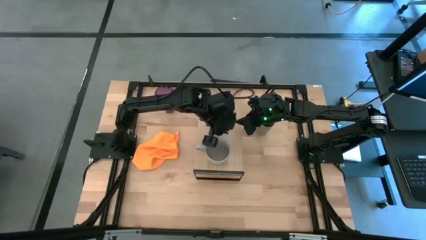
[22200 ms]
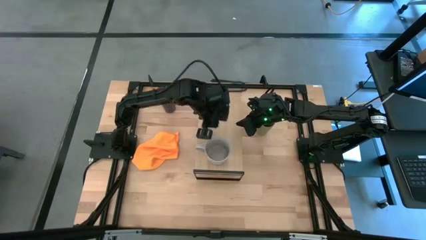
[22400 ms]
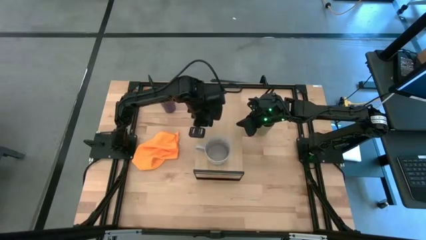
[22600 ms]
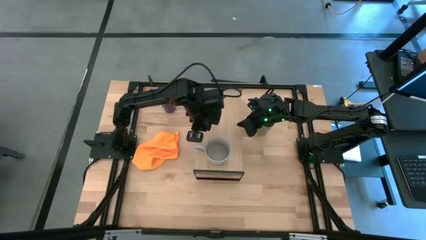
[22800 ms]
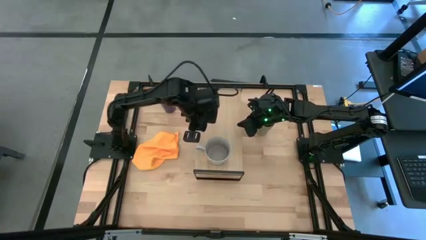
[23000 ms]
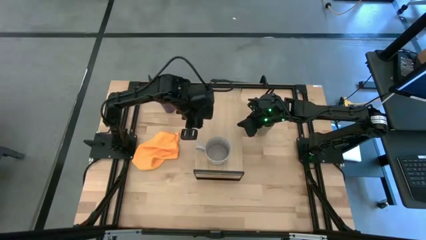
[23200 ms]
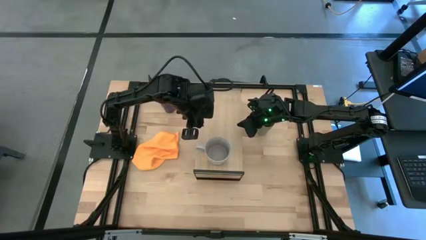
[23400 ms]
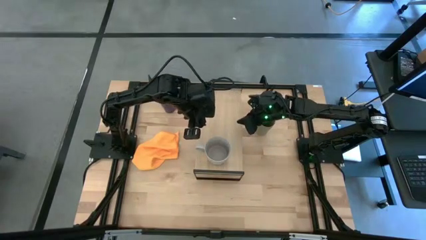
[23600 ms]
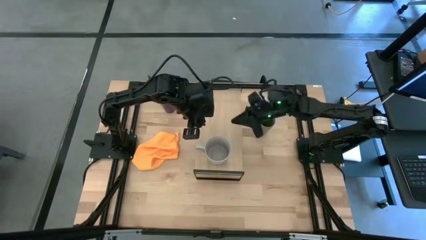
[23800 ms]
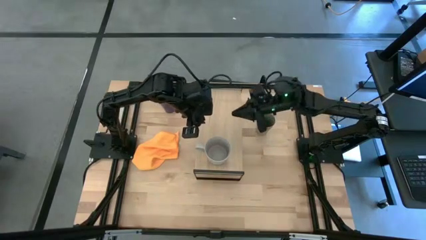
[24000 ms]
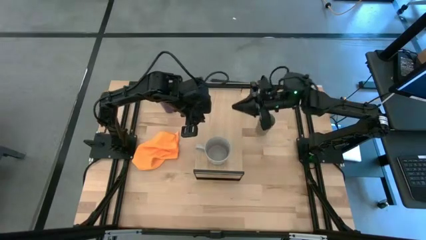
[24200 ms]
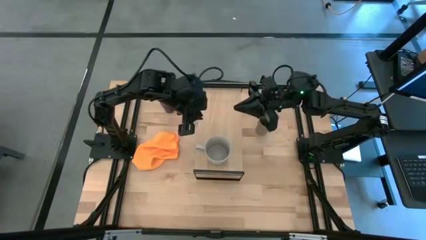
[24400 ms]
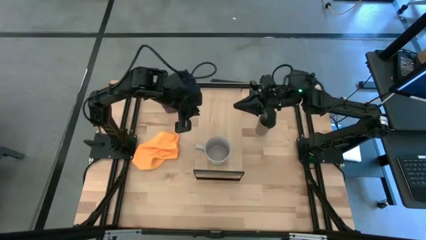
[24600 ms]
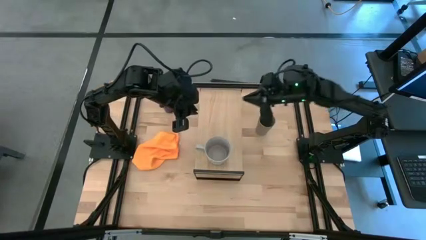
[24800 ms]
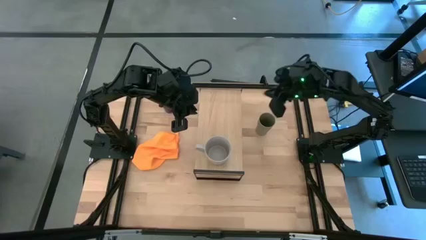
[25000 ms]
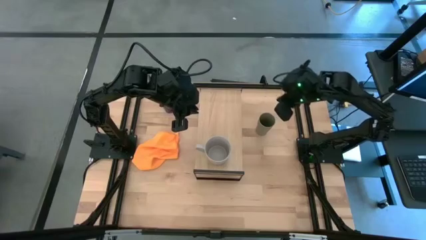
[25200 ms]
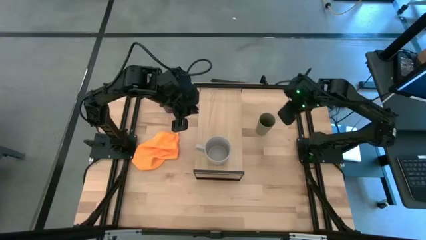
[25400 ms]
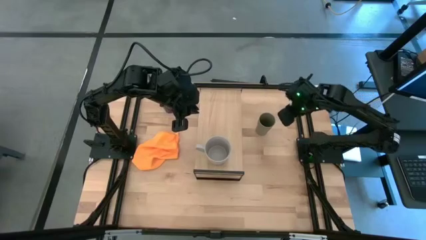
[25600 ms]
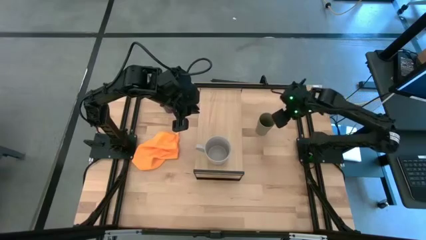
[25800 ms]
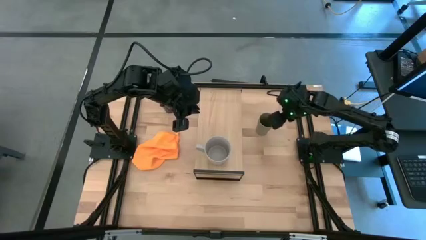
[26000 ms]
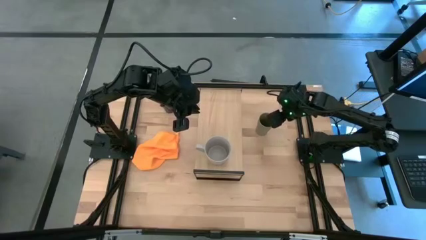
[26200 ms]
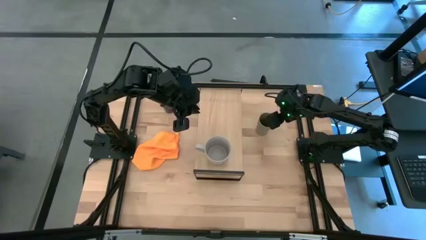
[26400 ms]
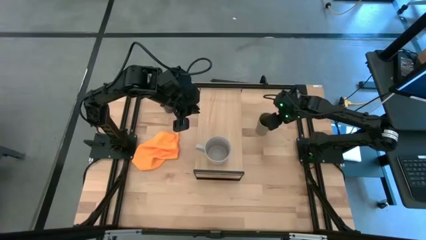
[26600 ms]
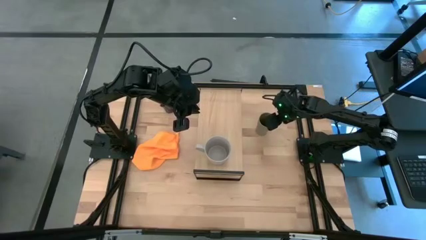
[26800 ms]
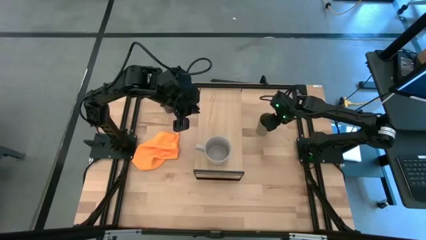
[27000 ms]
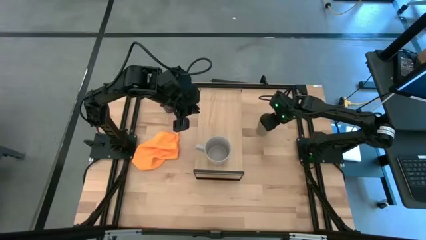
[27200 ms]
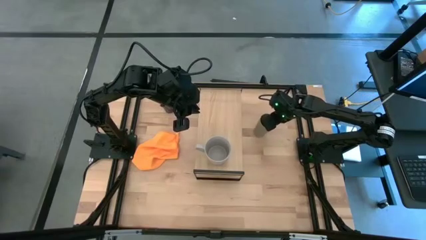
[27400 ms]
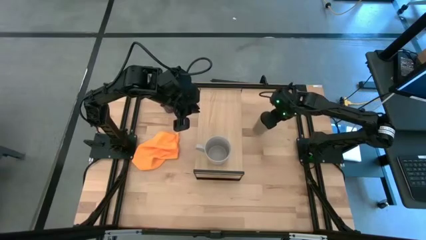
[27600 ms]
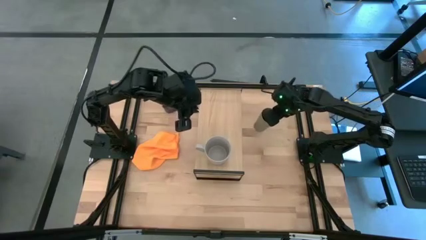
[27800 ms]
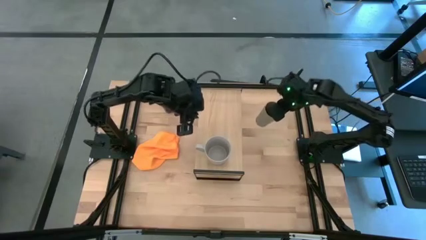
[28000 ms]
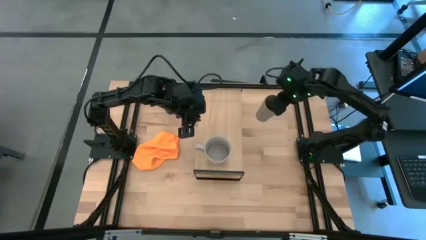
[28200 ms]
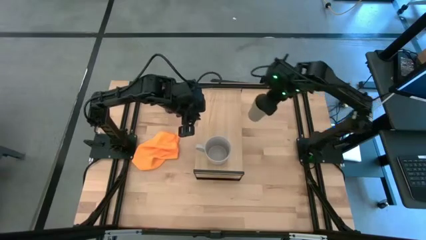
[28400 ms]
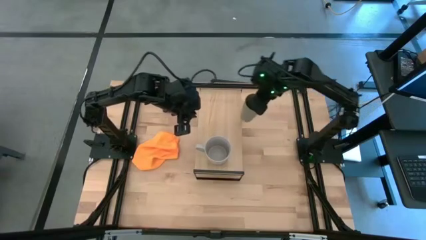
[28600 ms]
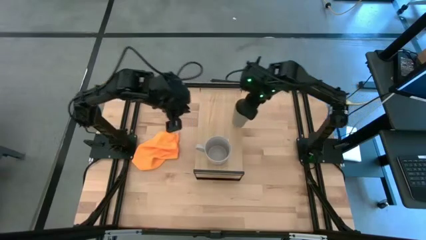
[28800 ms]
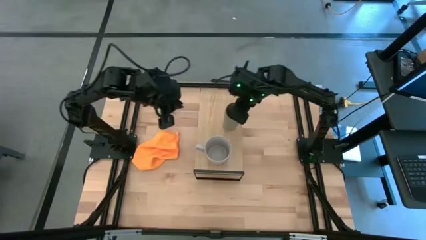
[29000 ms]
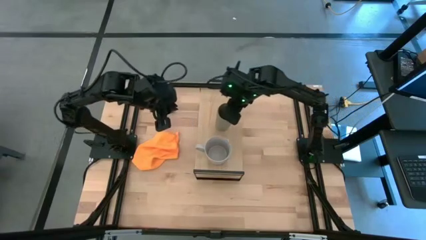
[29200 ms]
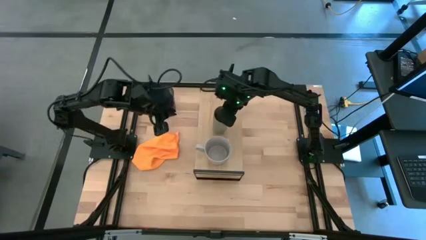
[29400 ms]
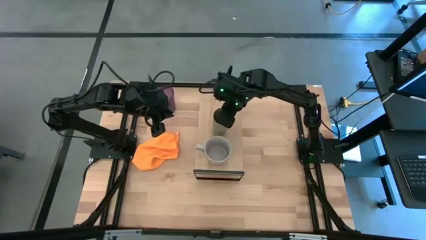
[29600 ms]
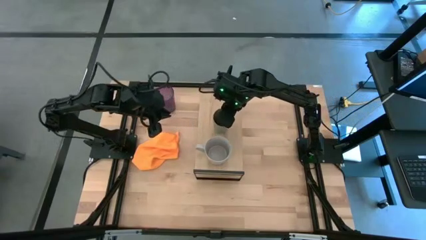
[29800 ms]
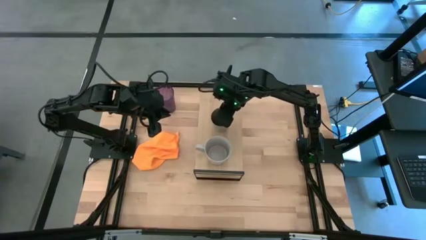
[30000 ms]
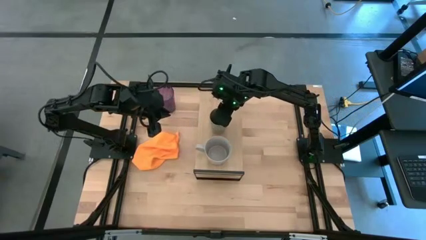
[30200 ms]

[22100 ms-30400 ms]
Task: Stack small to large cups/mugs on shelf
Put the brown cup on the shelf

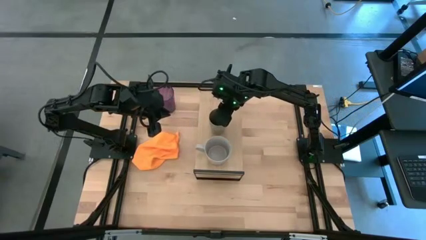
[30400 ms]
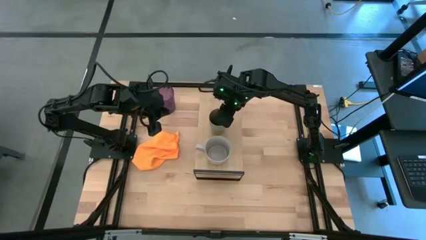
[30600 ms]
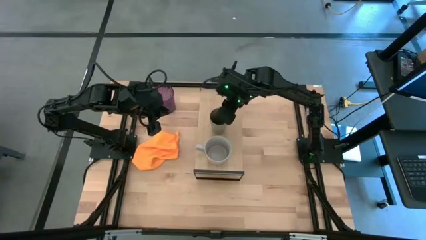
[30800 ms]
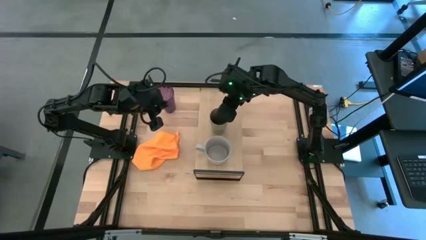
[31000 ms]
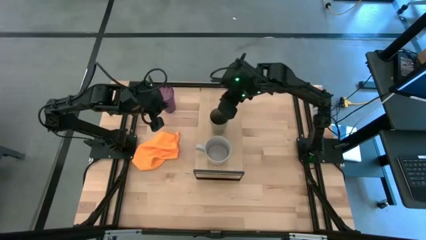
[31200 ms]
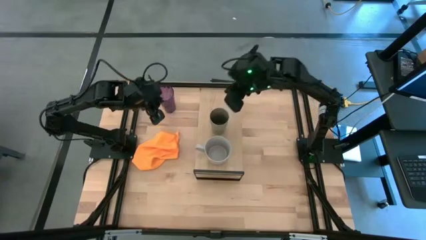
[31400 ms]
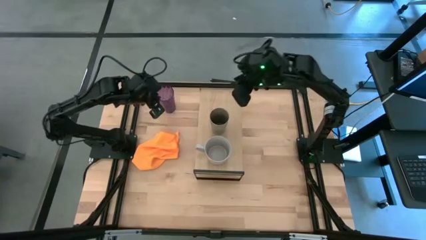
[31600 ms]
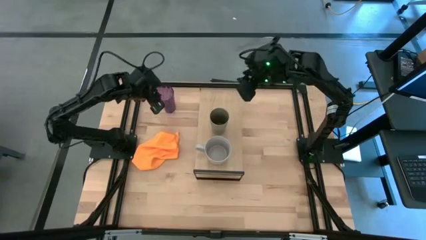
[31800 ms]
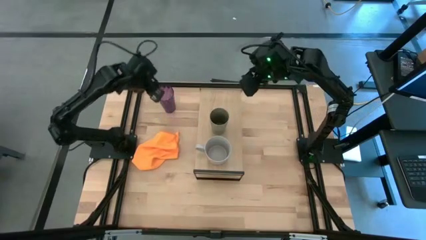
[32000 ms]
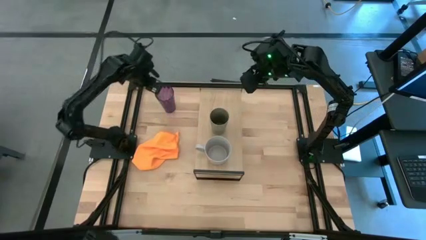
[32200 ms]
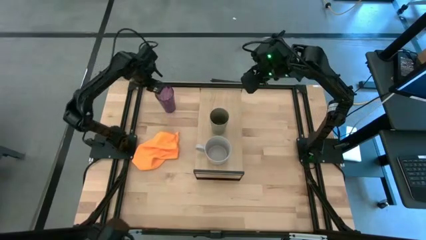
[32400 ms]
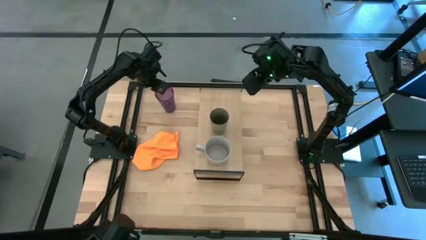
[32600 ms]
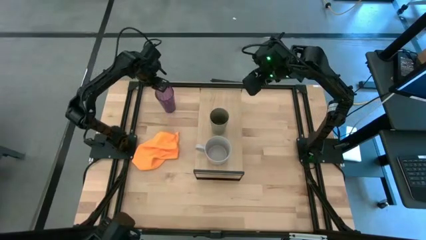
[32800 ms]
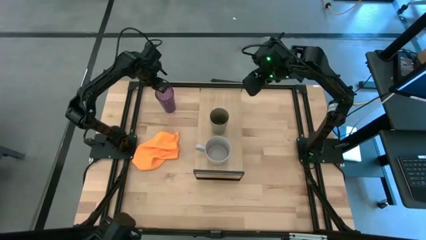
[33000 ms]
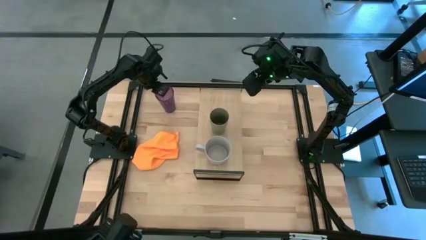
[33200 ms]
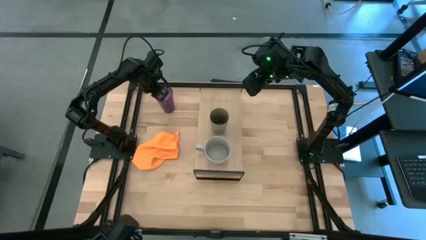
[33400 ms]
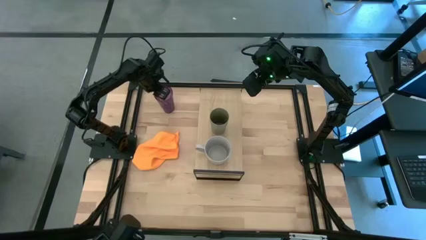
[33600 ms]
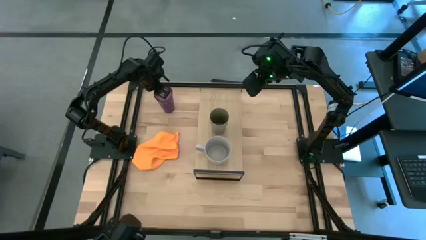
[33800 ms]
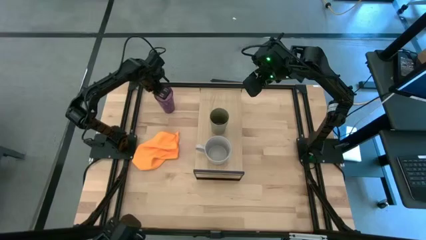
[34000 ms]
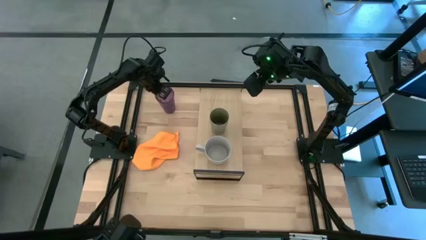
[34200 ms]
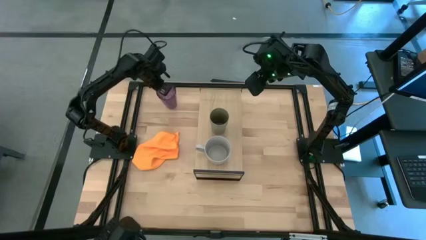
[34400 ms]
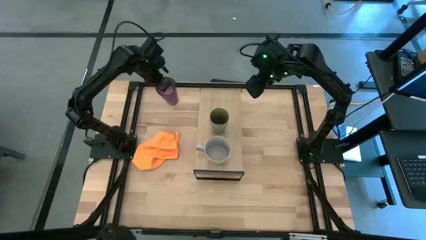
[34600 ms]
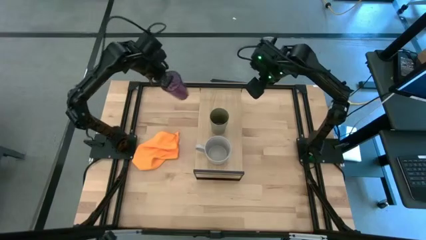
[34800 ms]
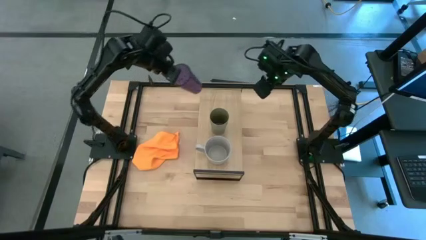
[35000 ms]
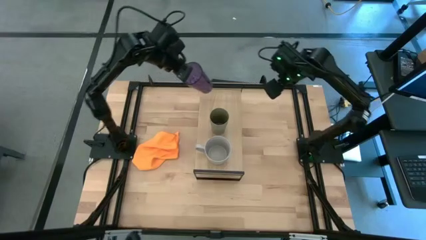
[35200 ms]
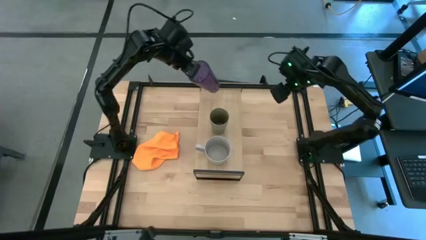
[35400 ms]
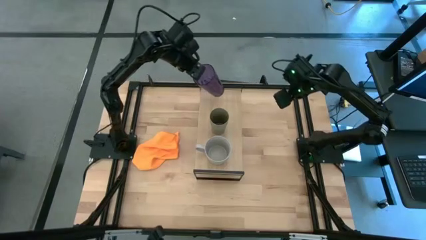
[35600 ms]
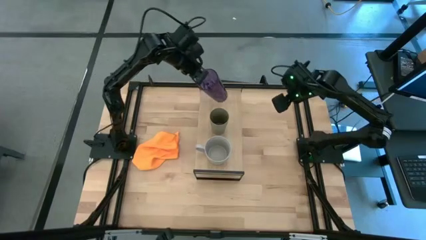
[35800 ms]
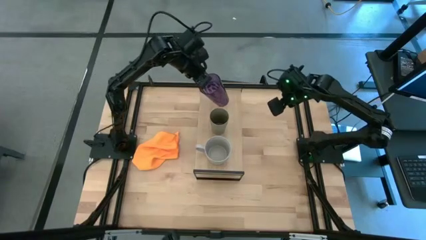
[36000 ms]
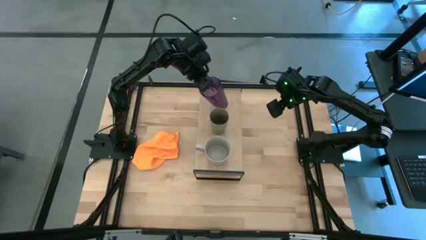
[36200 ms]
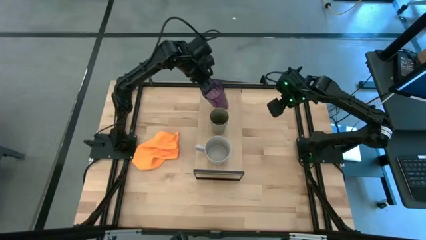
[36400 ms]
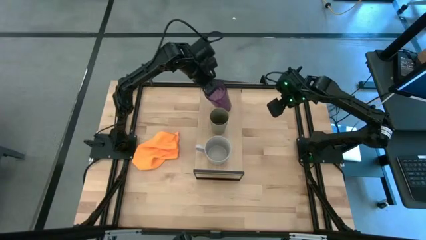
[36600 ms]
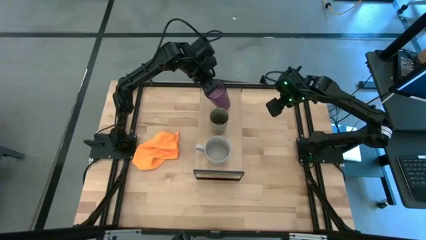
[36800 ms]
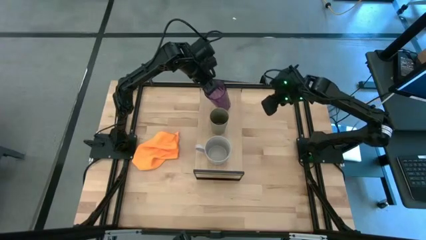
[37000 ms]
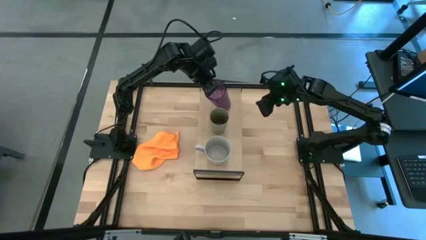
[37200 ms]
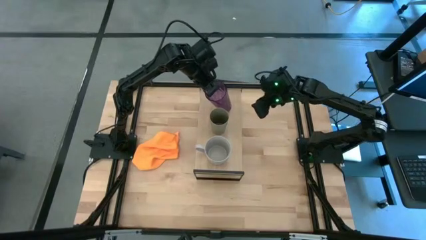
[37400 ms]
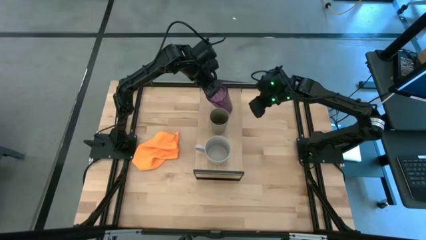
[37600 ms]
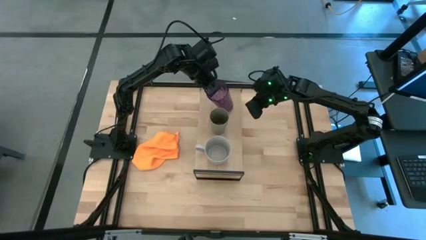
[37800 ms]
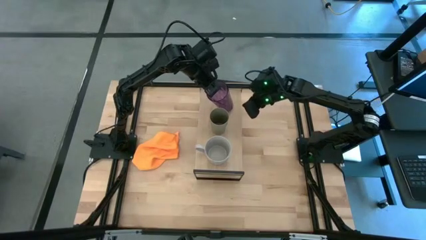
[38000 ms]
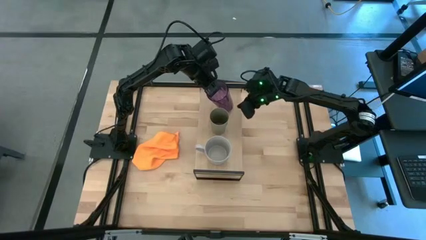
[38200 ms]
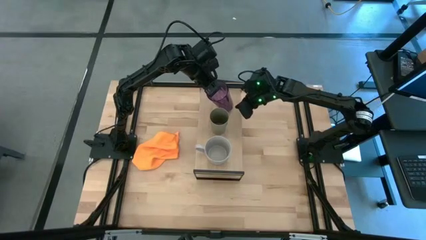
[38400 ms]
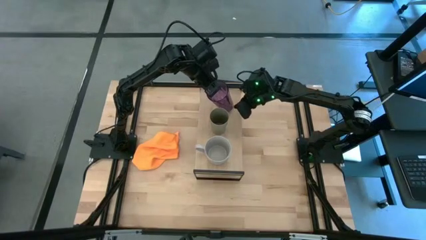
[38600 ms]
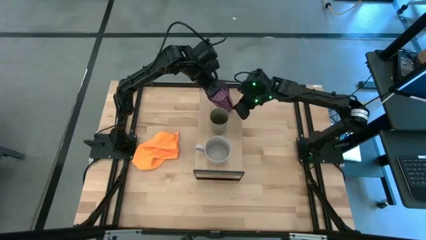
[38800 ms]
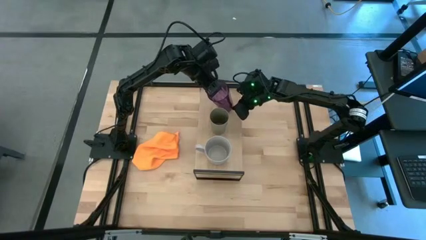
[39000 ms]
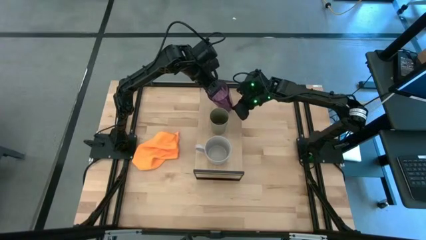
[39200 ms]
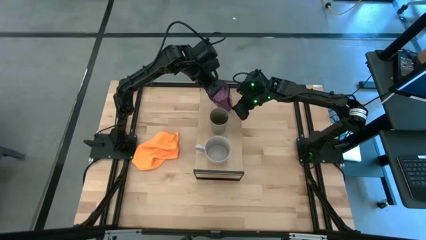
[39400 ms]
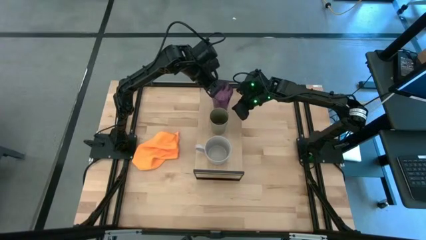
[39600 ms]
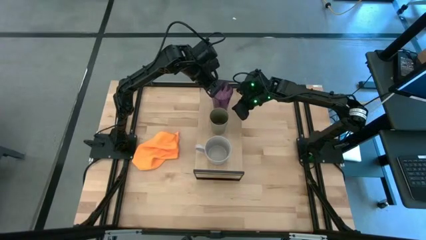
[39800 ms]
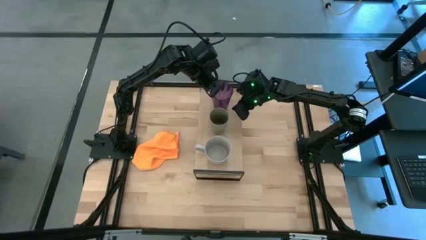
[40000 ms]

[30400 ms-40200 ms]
Put the purple cup on the shelf
